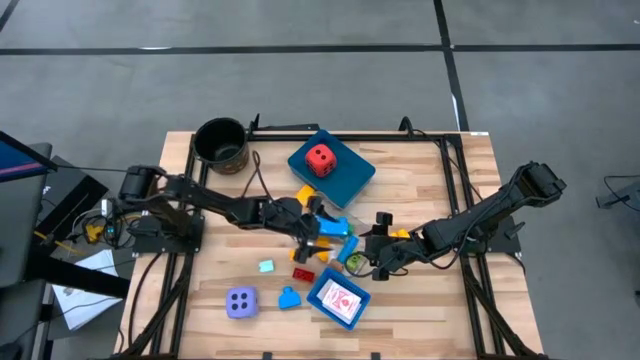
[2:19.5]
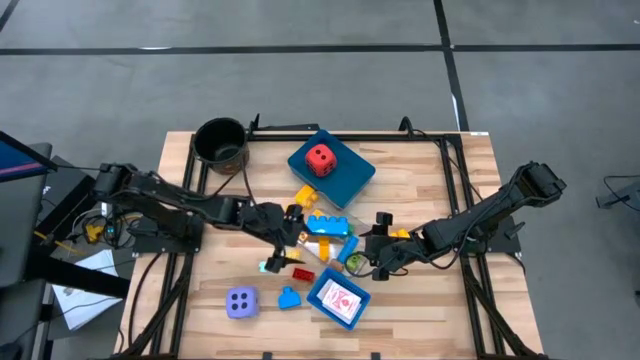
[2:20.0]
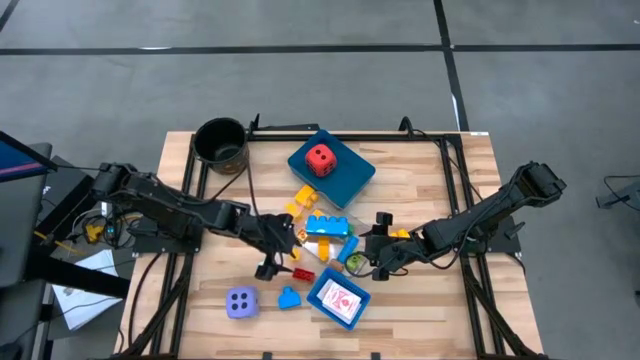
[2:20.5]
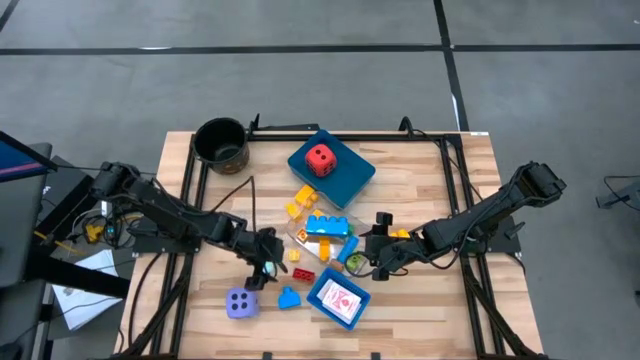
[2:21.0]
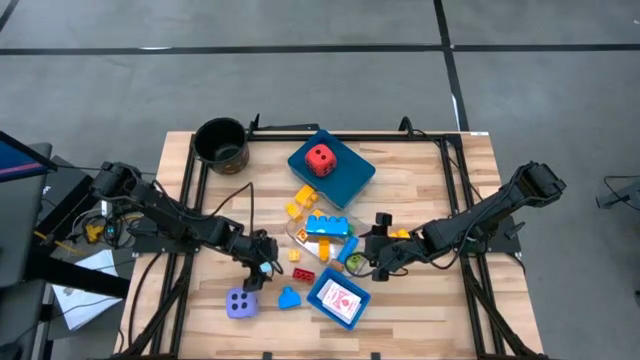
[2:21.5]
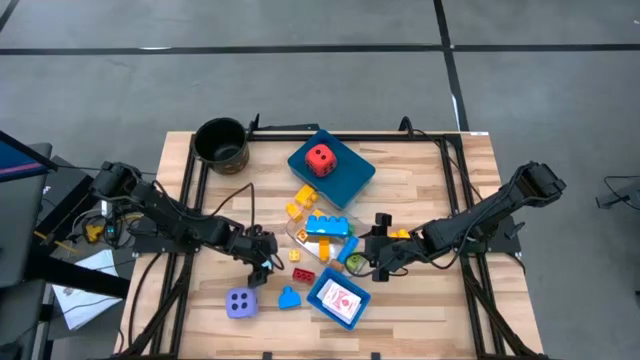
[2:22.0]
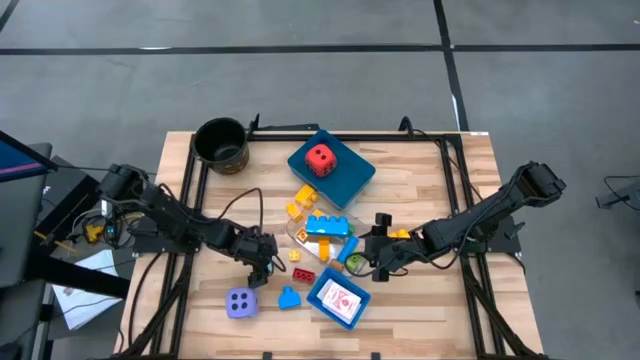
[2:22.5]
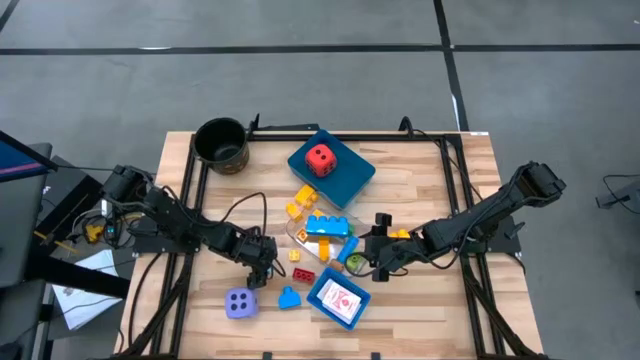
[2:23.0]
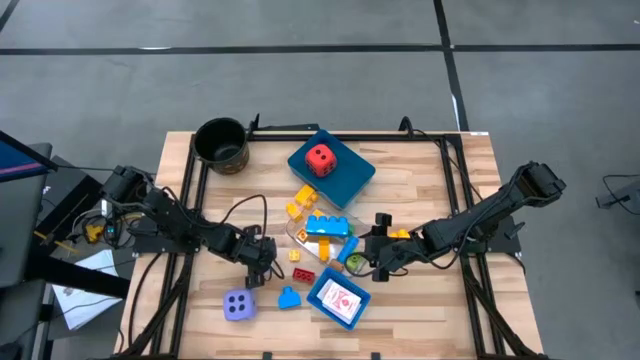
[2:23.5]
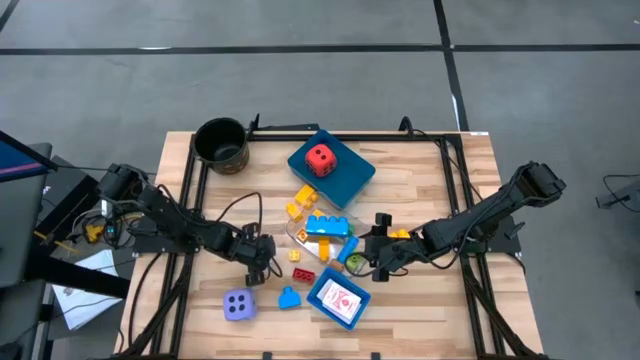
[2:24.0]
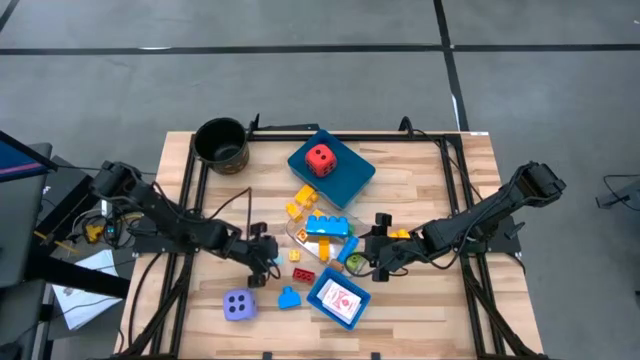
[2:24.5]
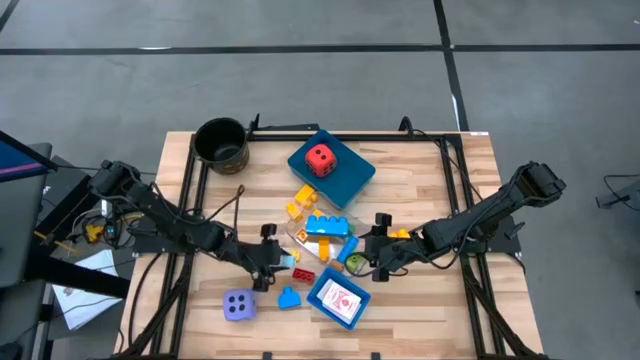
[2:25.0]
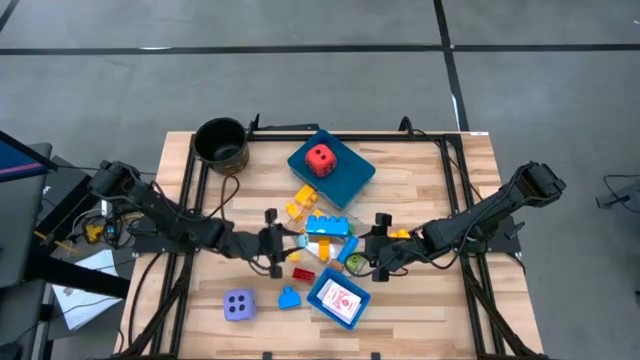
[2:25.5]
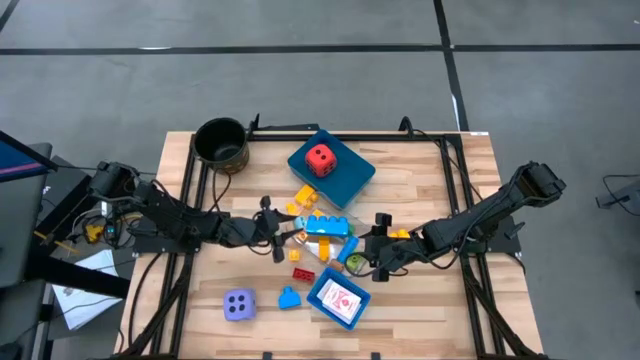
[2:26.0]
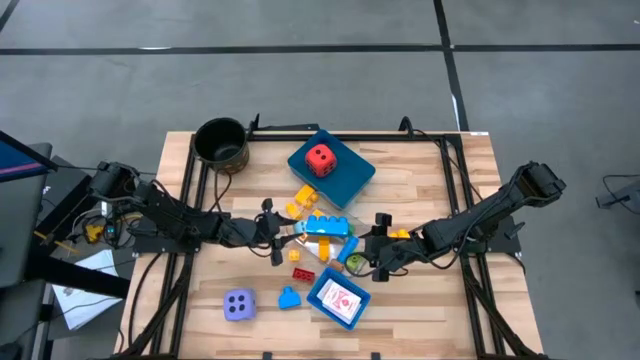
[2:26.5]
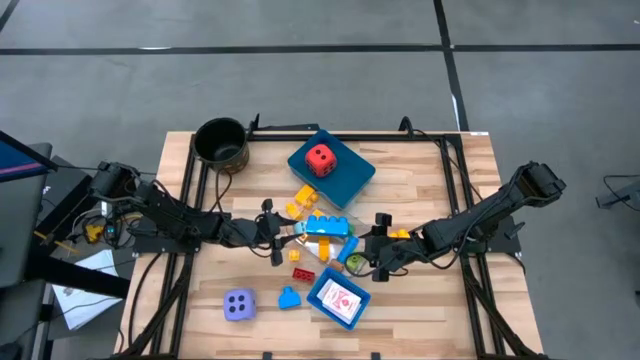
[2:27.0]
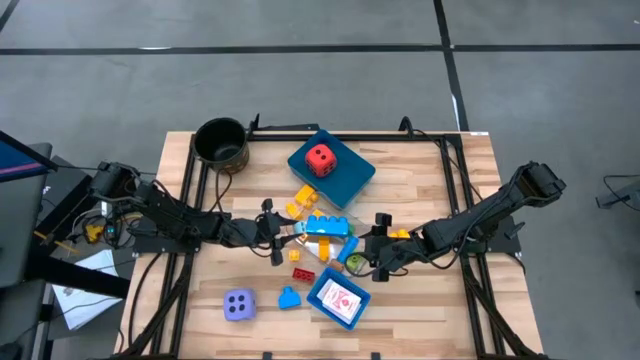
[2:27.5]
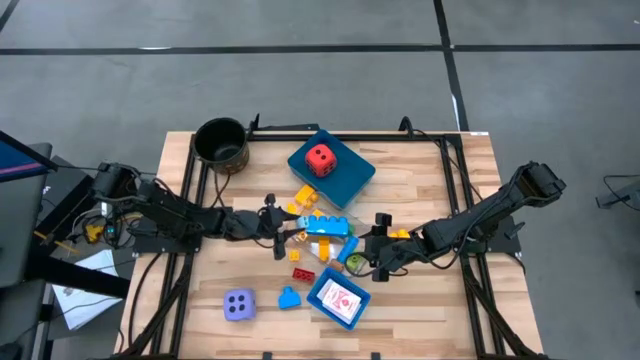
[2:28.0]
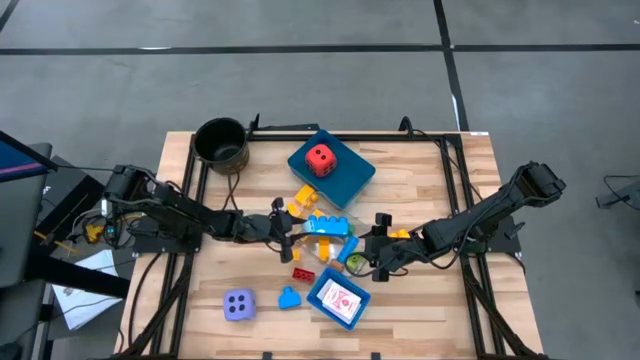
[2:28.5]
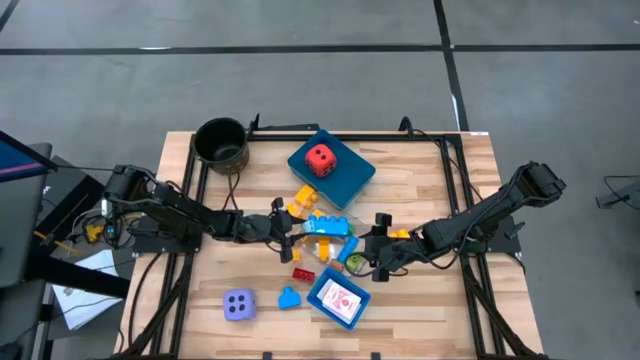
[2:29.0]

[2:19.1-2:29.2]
Task: Pick & Place Toys
Put the light blue game piece block into the transparent bin

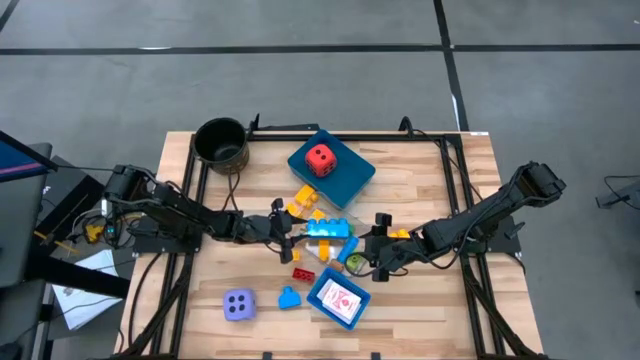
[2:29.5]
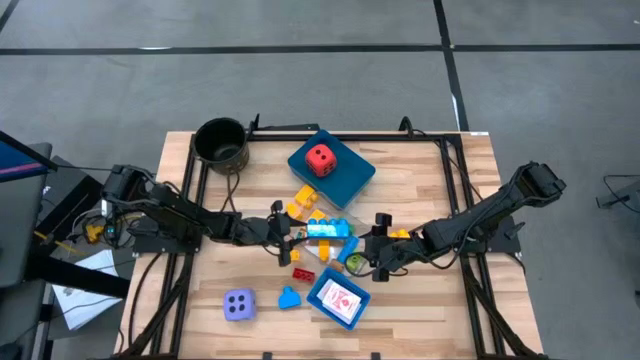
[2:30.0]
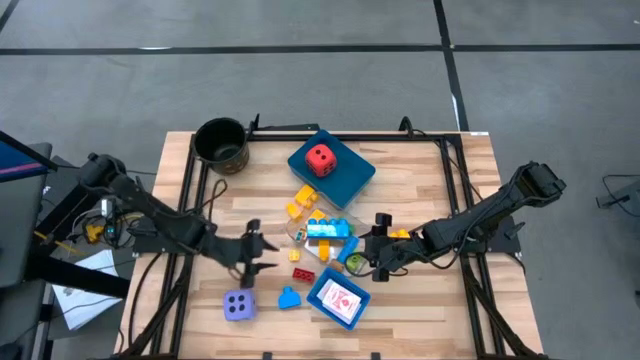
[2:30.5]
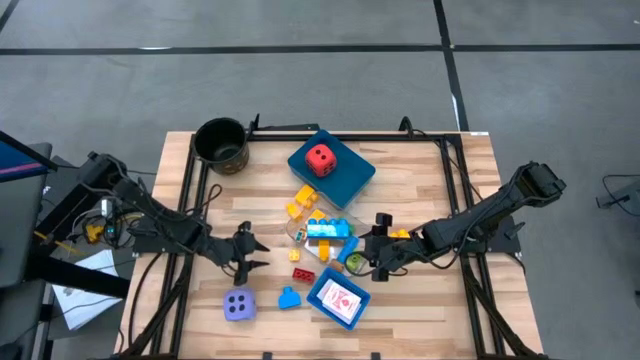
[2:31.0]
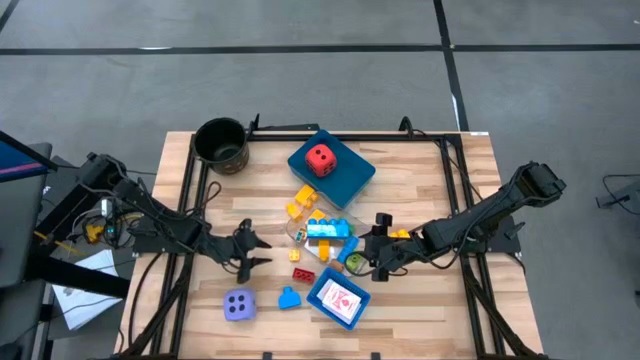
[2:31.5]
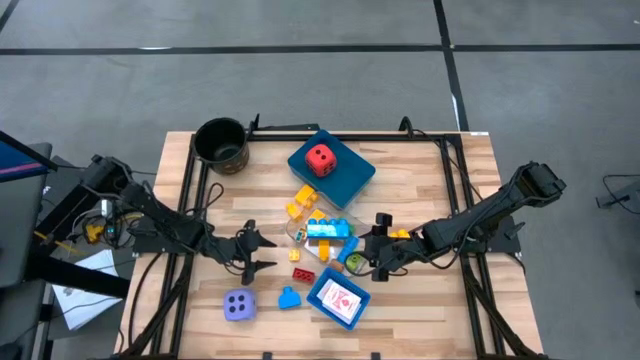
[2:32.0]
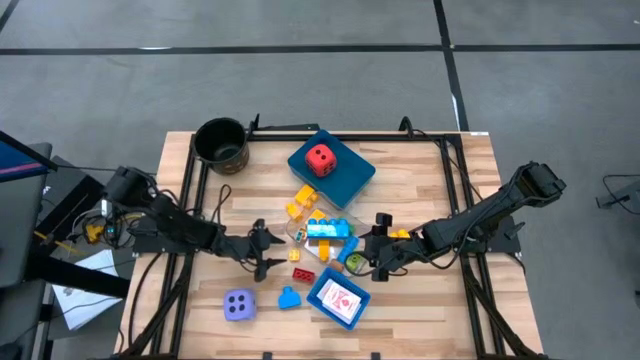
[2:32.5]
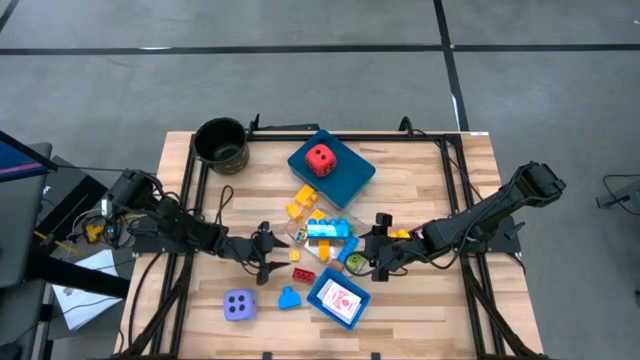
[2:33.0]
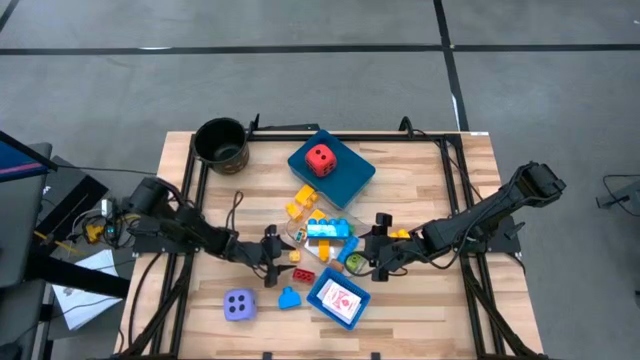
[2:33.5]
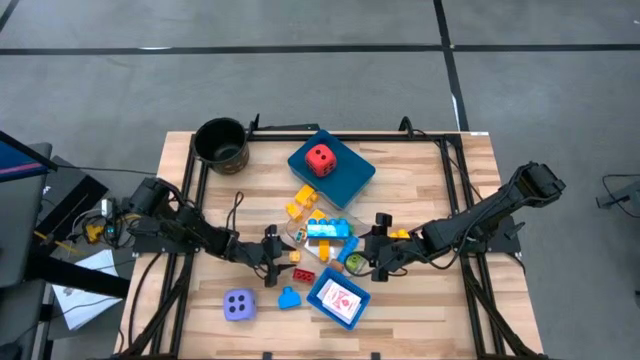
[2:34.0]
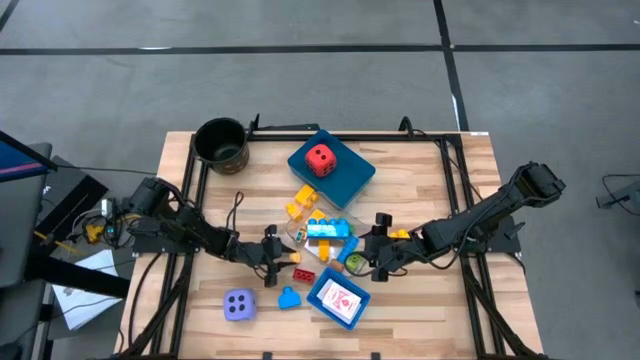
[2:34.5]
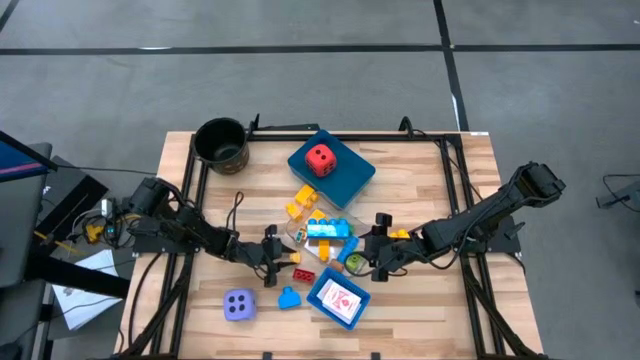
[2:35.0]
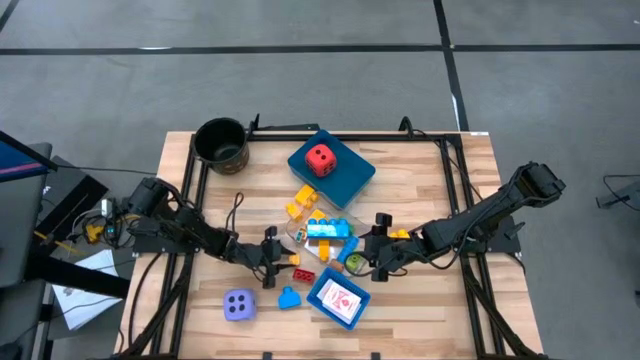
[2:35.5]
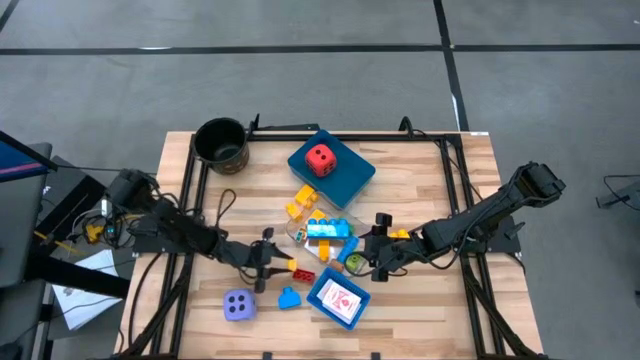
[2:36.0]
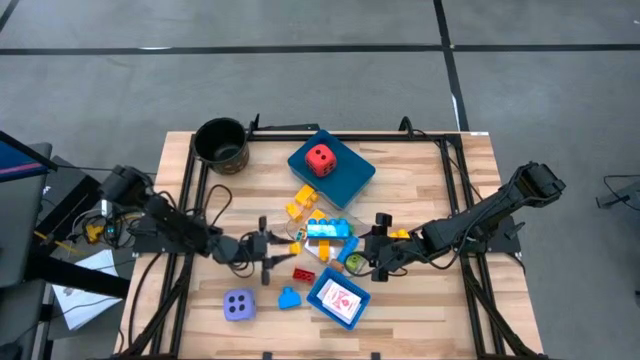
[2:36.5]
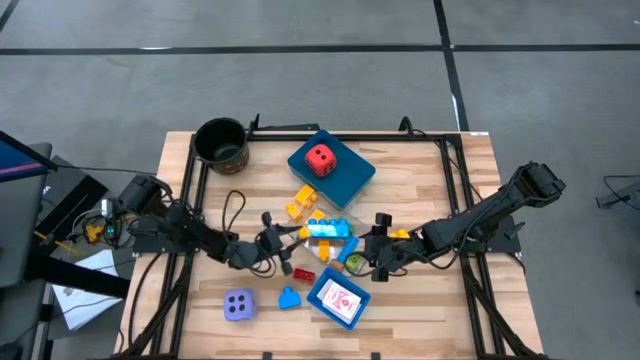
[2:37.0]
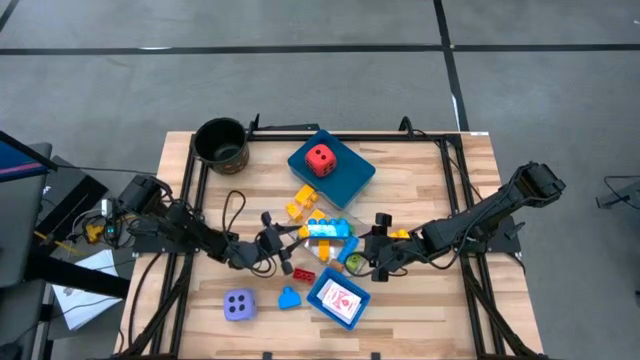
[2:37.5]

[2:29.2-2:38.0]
Put the yellow game piece block into the transparent bin

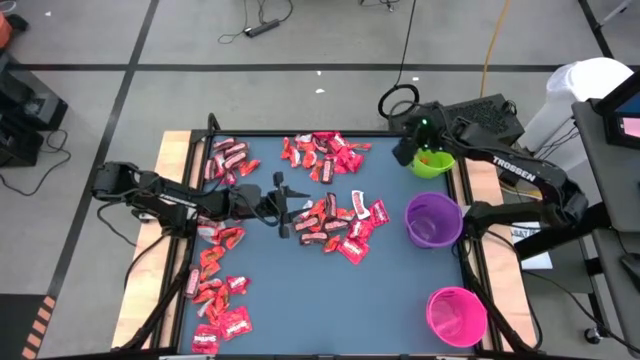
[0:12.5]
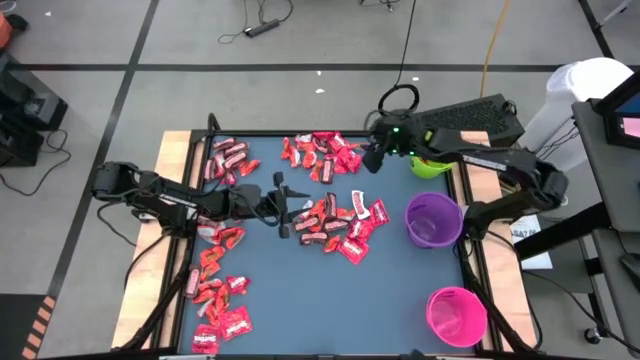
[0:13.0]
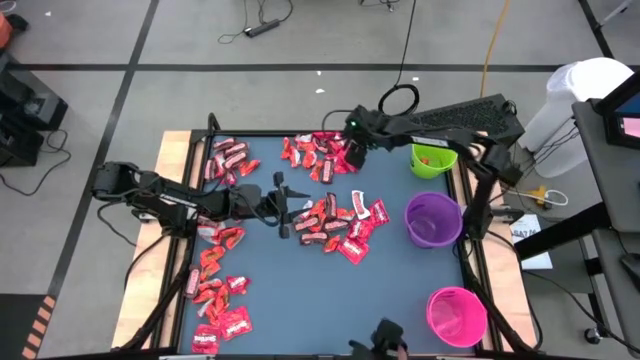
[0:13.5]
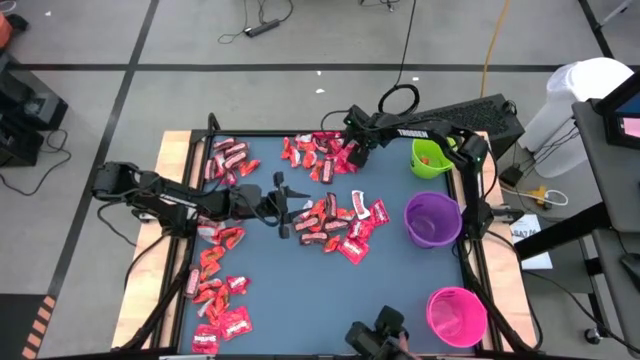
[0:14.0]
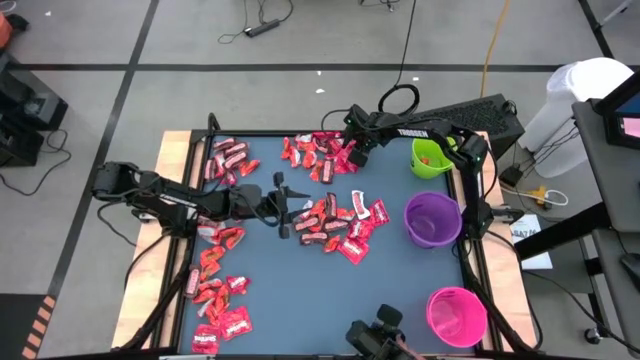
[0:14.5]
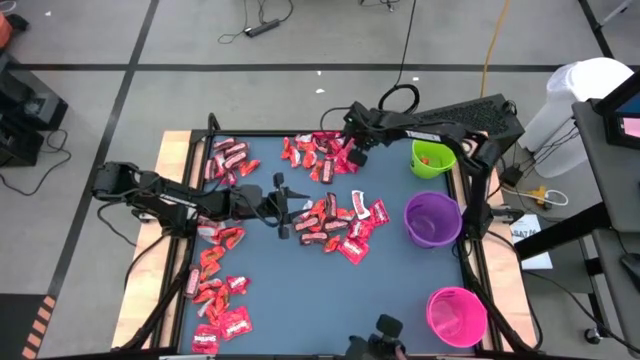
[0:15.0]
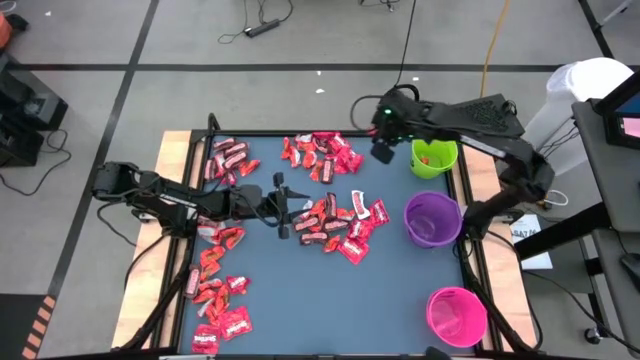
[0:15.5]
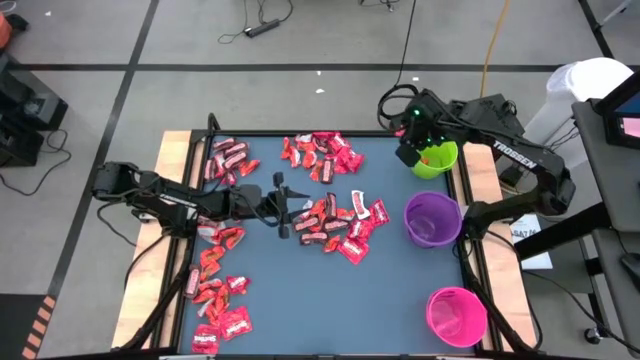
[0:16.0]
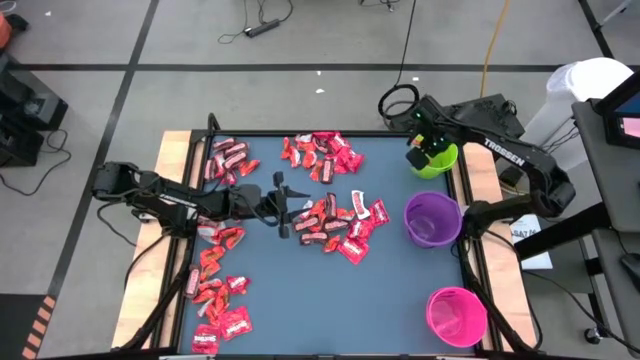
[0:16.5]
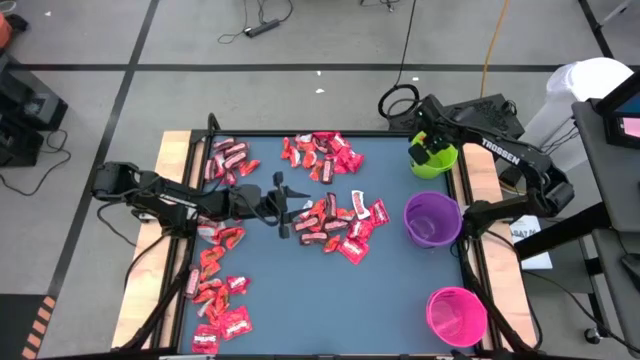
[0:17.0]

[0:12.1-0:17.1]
Task: Organize candy in baskets
Put the orange chocolate bar into the green bucket
